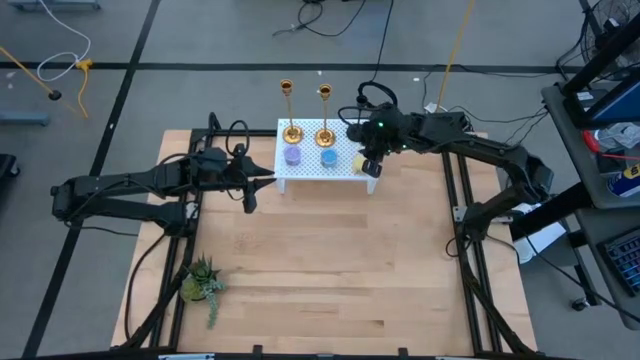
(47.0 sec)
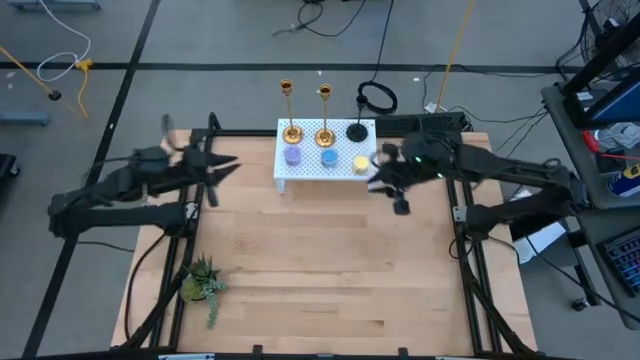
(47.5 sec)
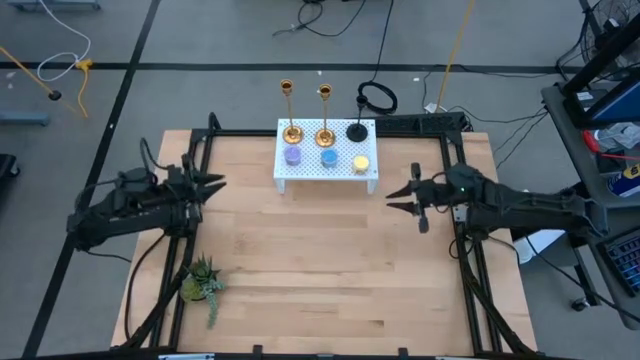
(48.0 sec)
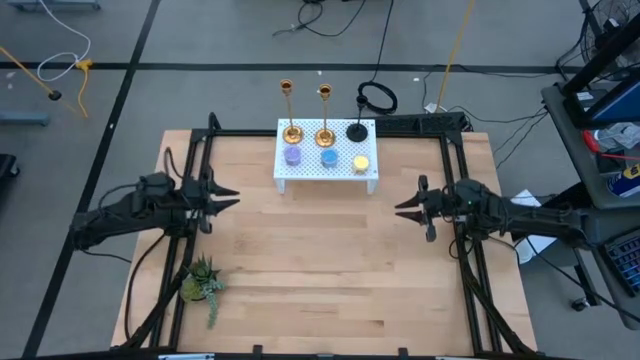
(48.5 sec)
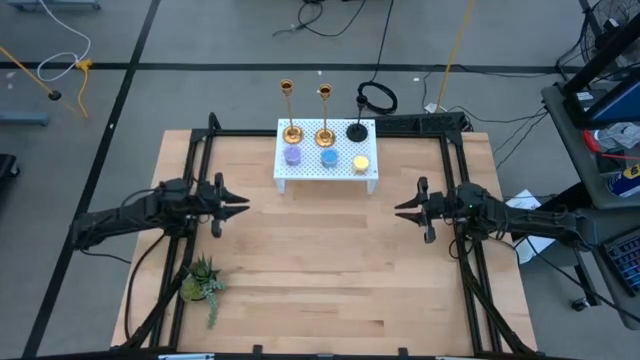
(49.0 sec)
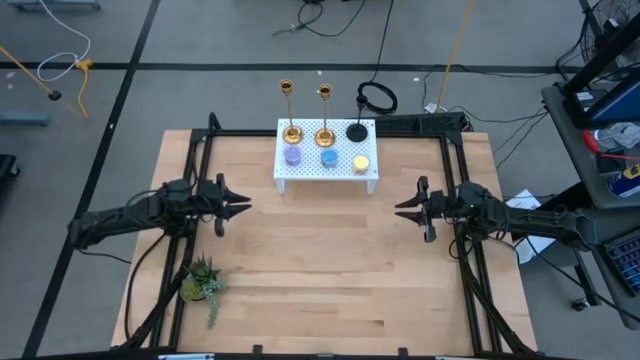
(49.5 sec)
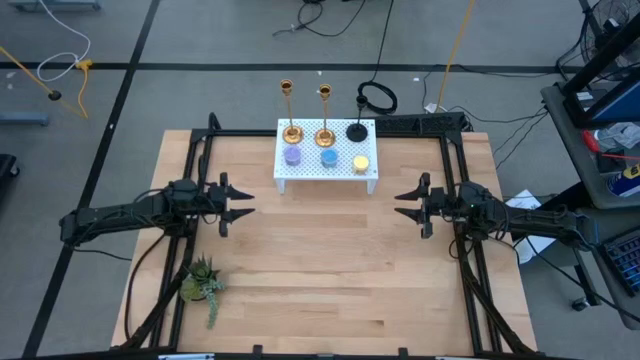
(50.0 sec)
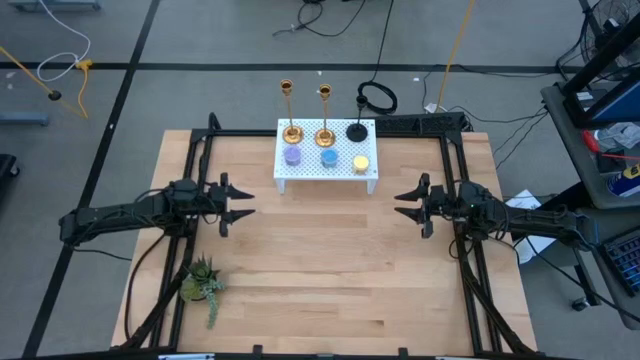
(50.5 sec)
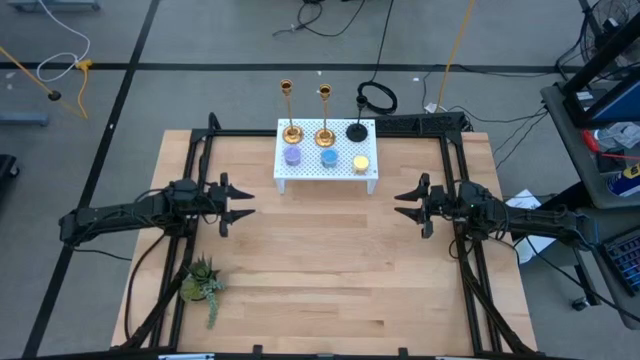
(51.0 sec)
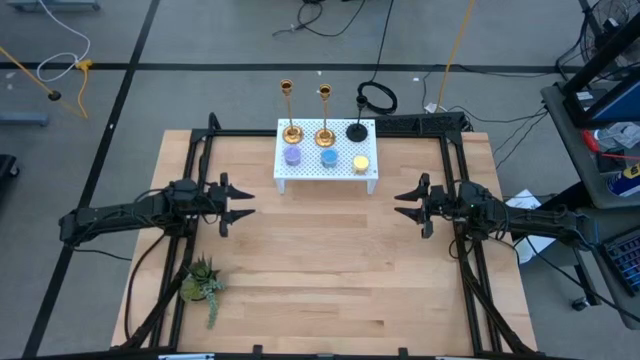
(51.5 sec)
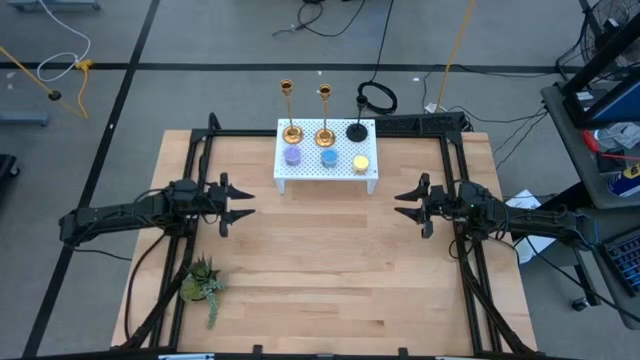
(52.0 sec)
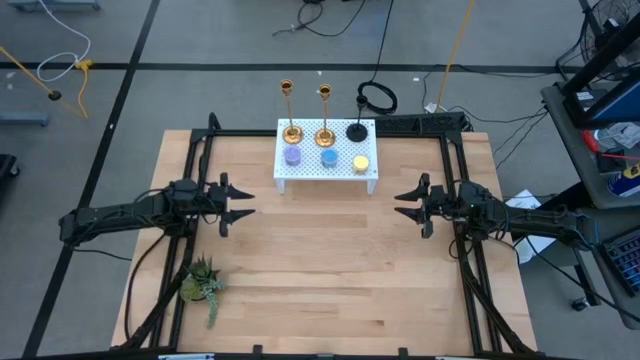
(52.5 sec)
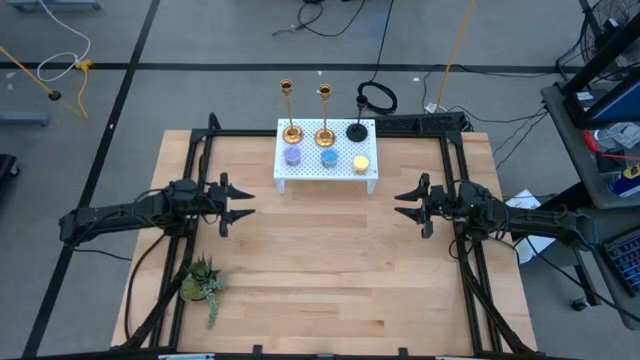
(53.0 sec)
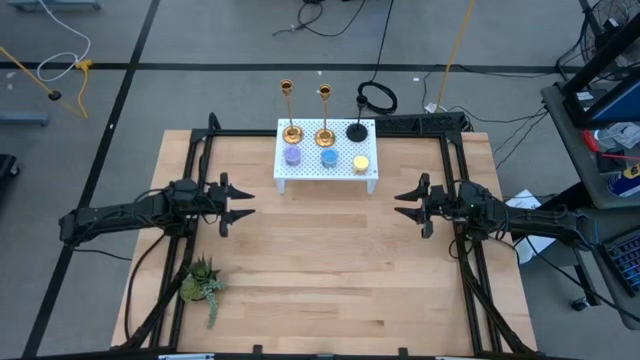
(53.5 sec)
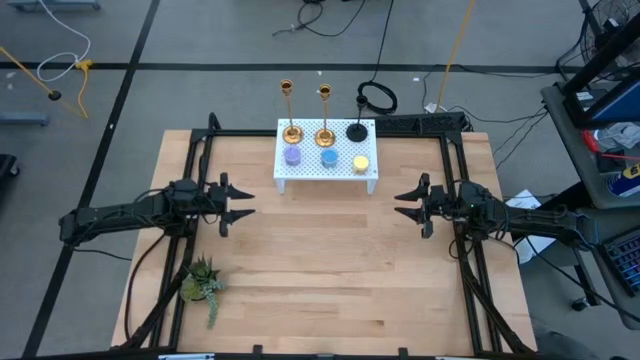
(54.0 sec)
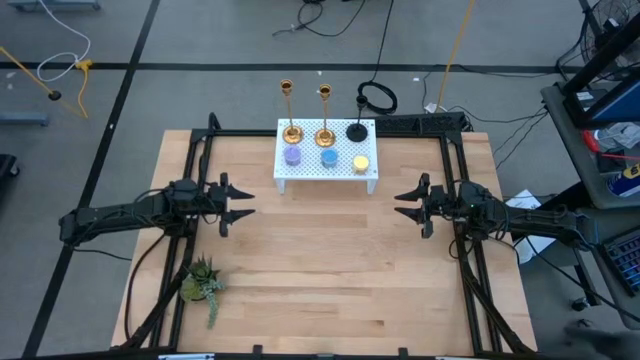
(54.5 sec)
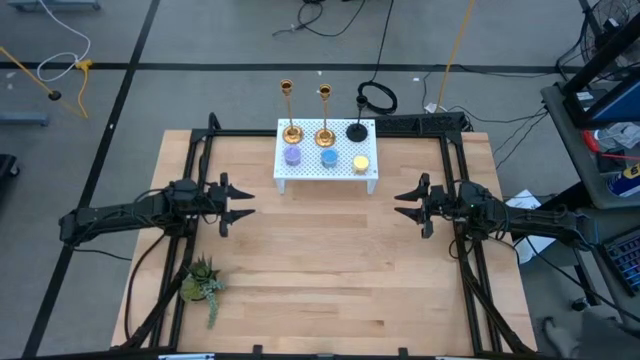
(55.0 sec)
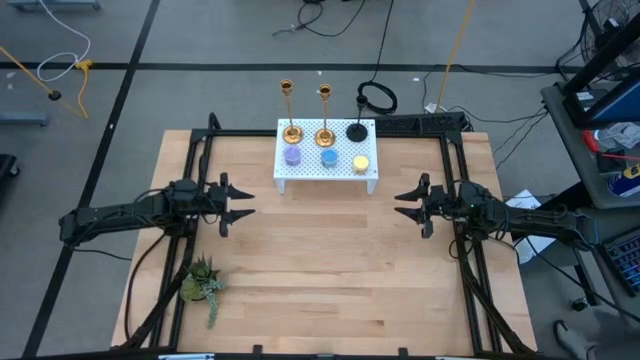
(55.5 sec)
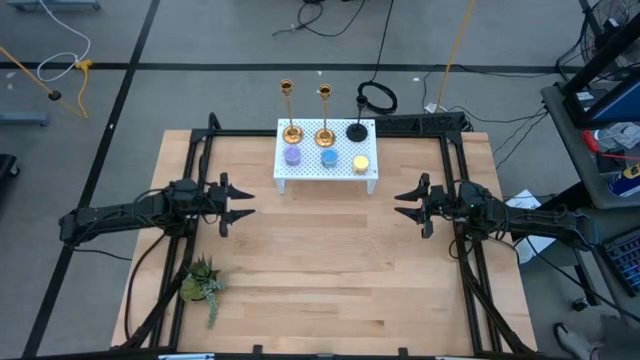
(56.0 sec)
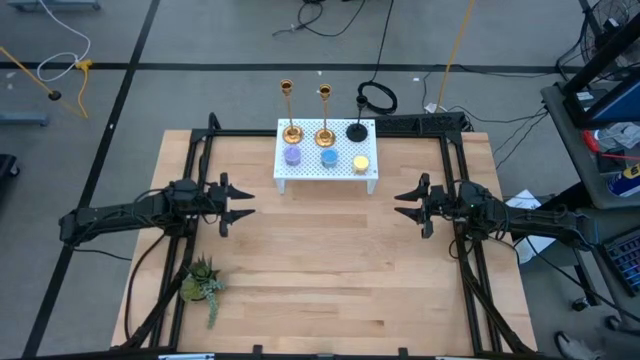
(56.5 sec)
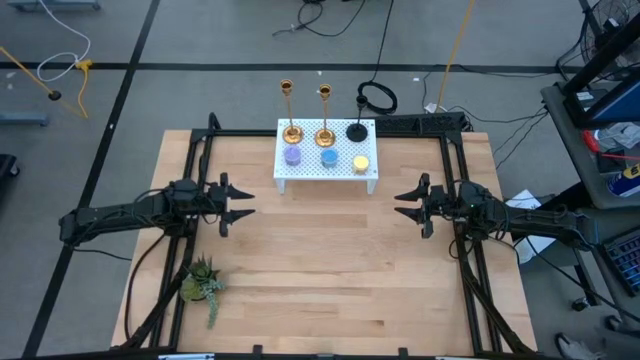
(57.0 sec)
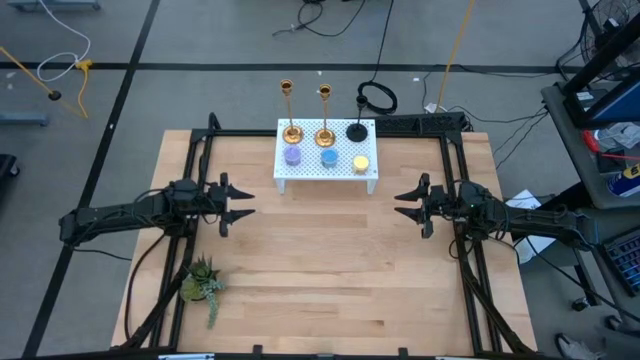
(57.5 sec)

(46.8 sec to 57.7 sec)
Task: Pick & Place candle stick holders
Return to Home Position

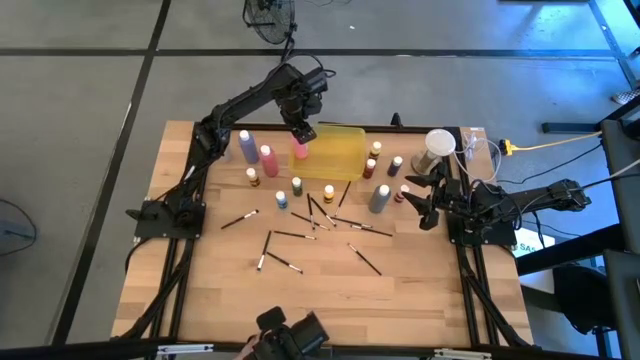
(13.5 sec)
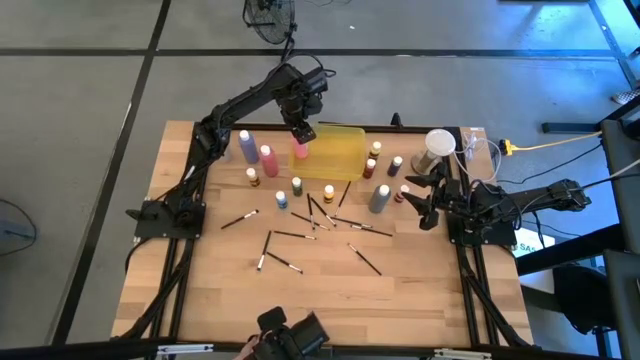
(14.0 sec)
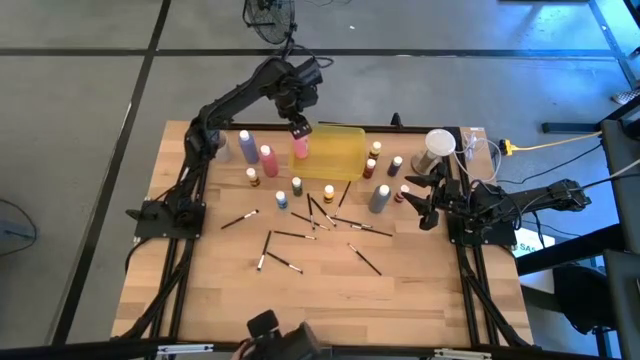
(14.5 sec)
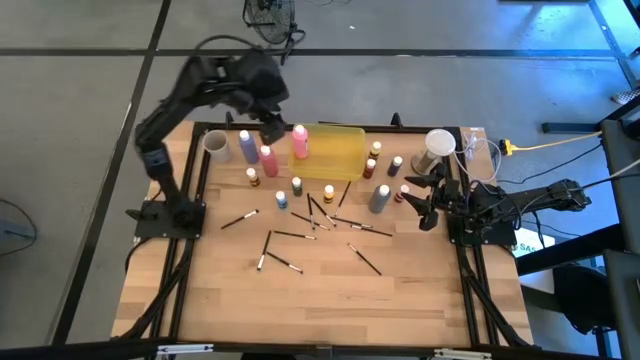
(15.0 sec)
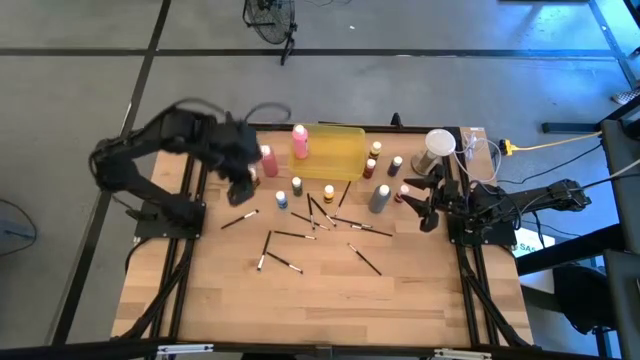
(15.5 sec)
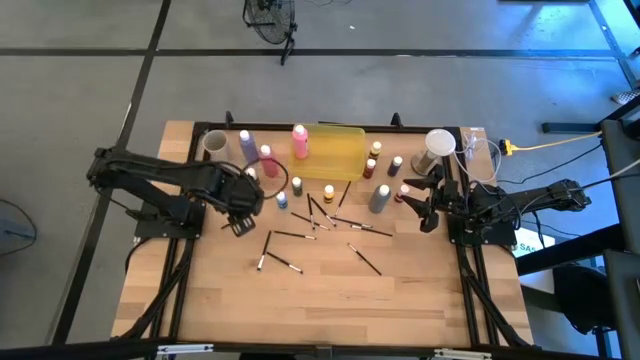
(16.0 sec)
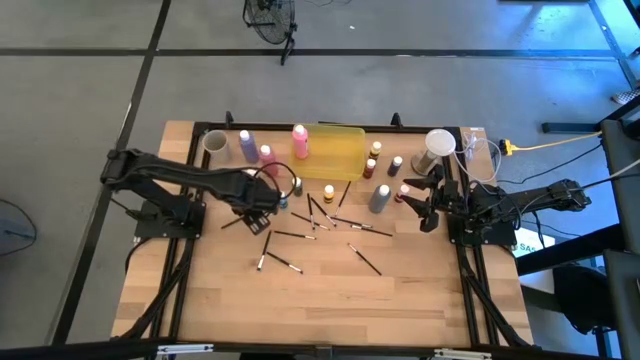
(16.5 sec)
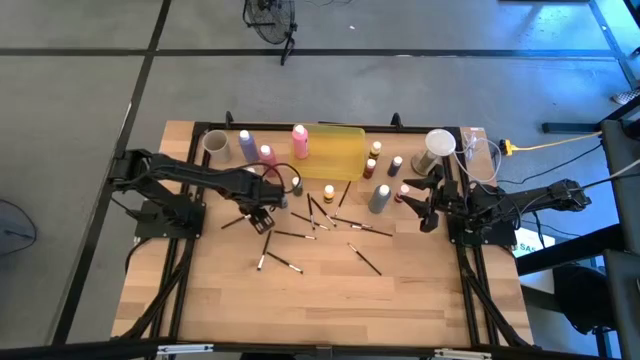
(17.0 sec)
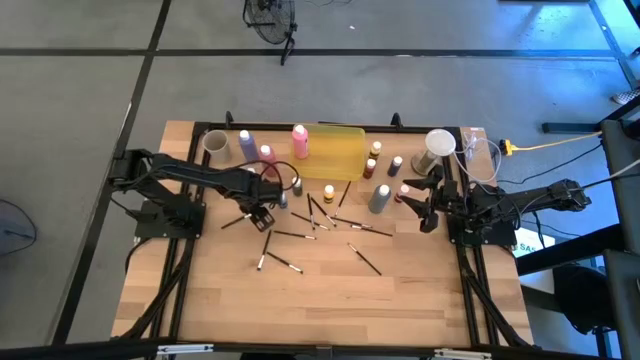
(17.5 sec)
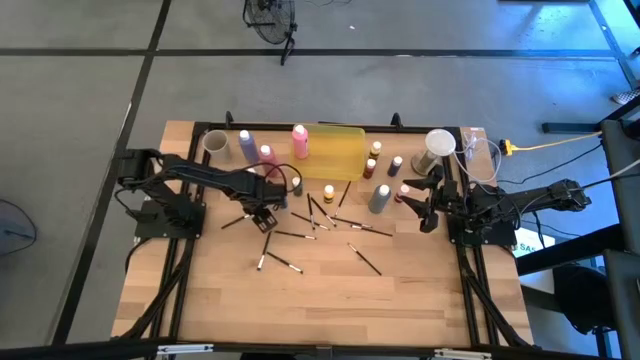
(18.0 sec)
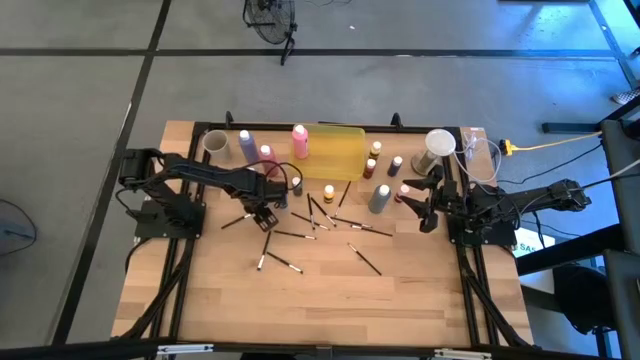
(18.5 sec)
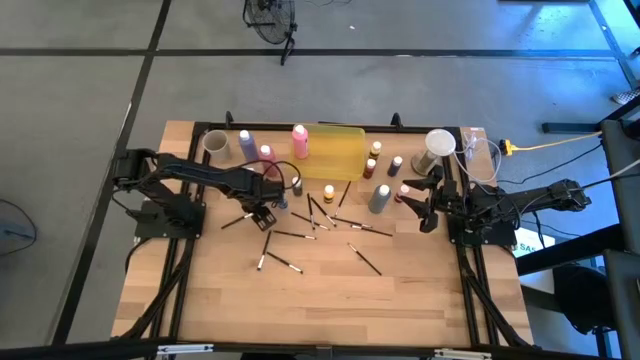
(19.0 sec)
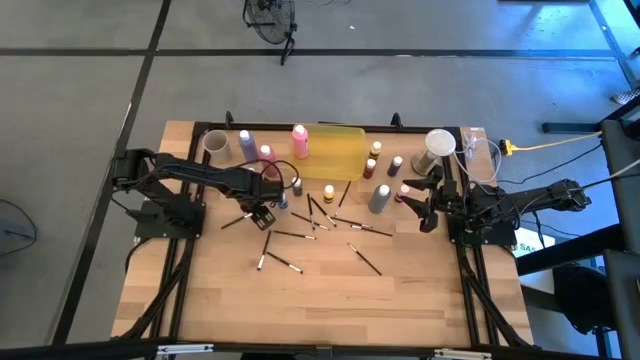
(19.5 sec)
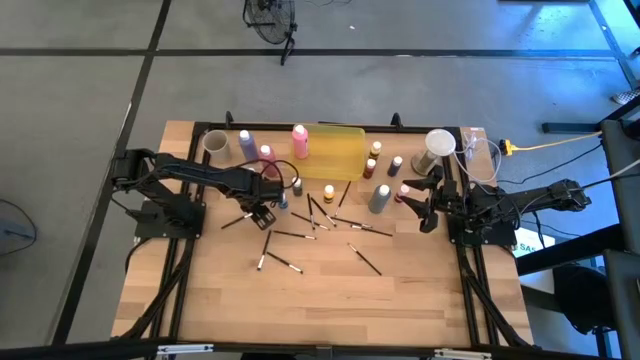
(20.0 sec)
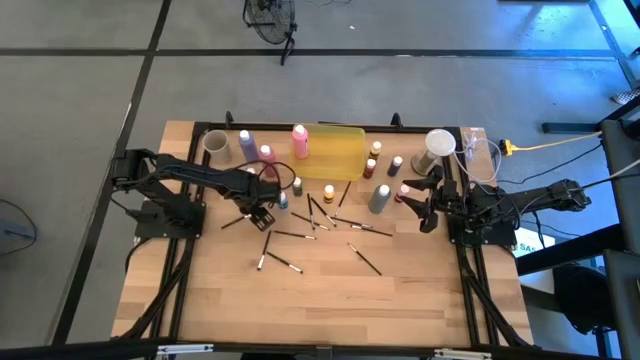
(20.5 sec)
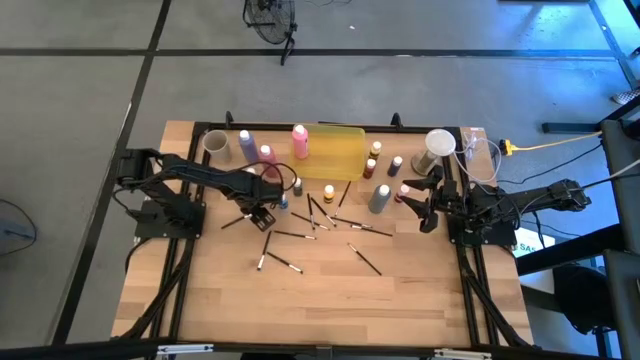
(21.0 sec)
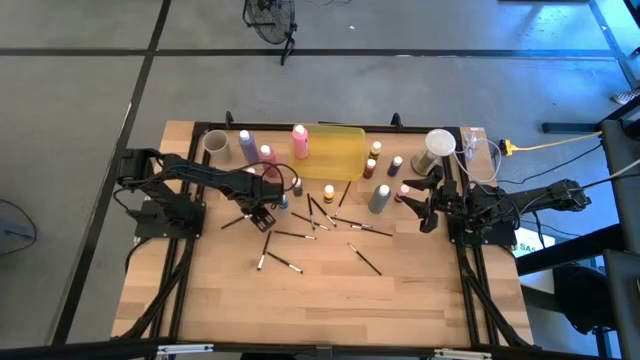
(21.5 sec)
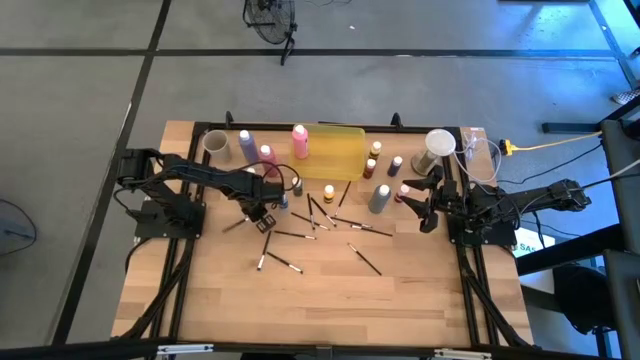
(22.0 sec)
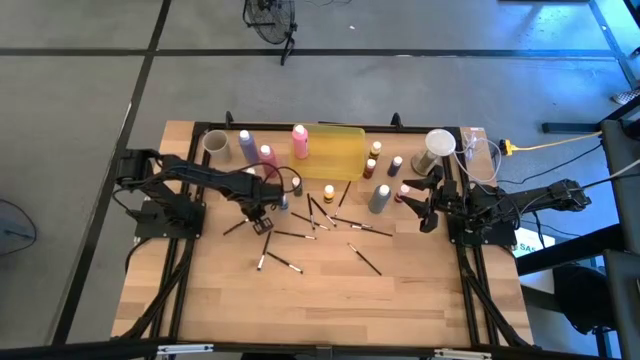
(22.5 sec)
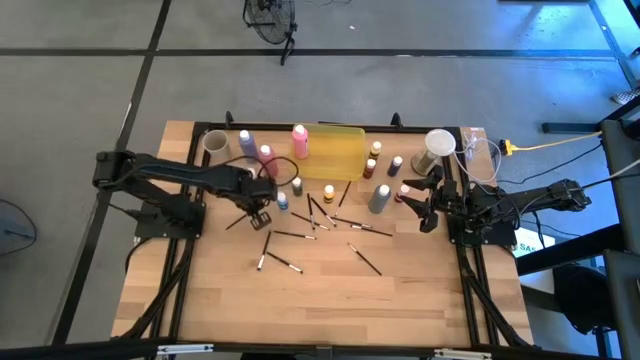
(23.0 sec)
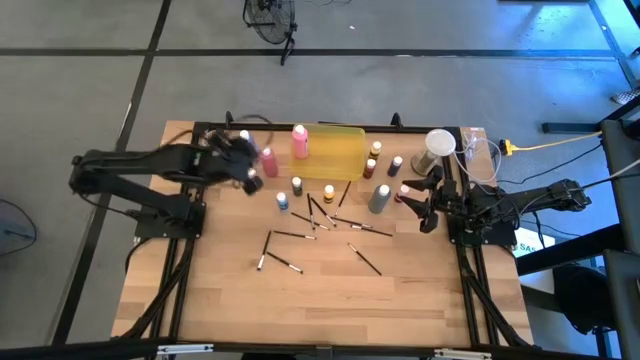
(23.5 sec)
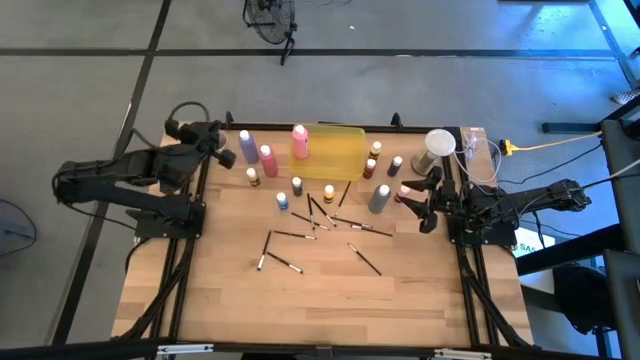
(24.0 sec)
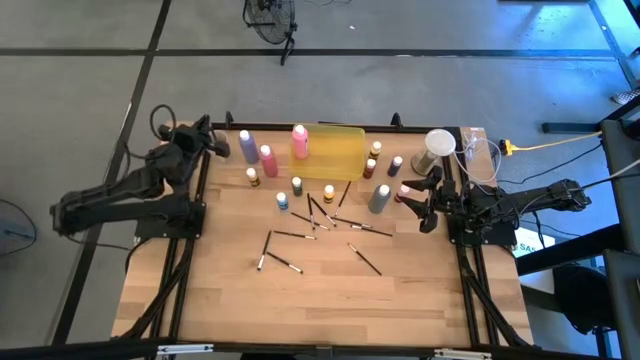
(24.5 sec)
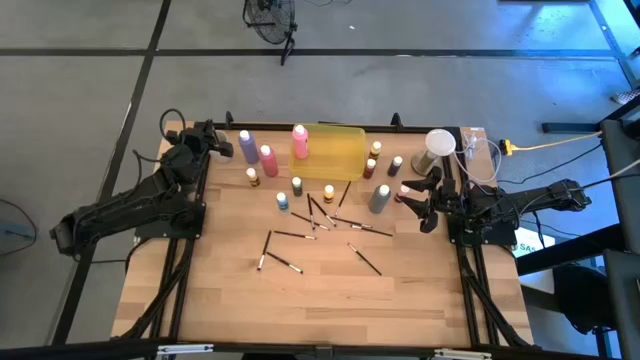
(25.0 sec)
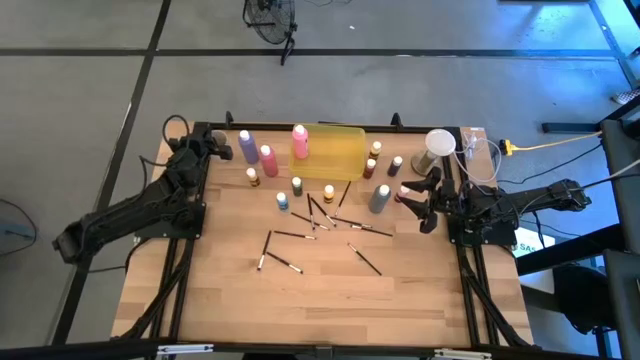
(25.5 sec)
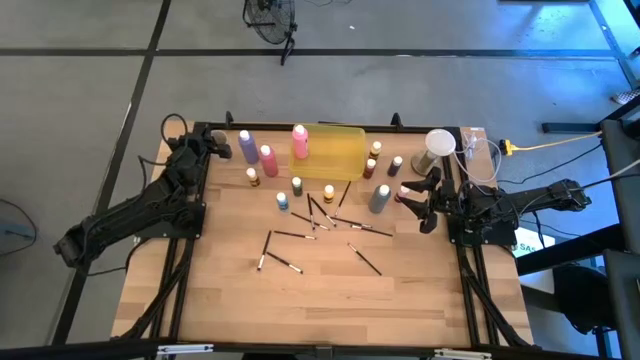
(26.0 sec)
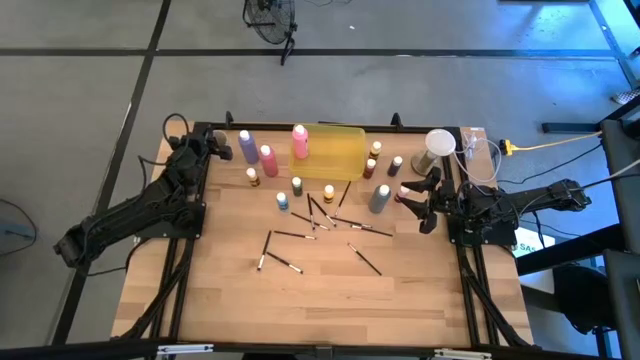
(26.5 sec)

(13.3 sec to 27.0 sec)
Task: Pick & Place Paint Supplies
Put the silver paintbrush into the white cup
